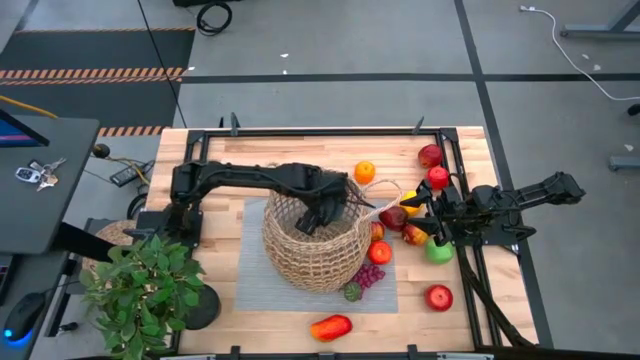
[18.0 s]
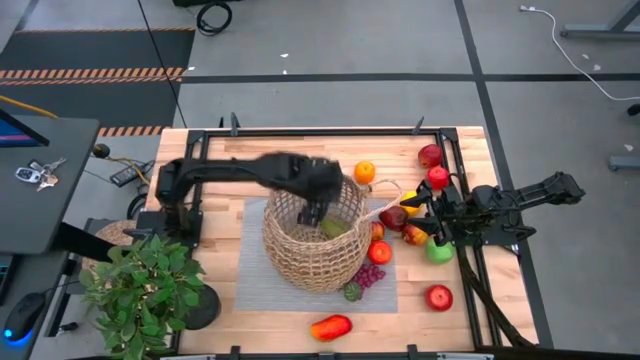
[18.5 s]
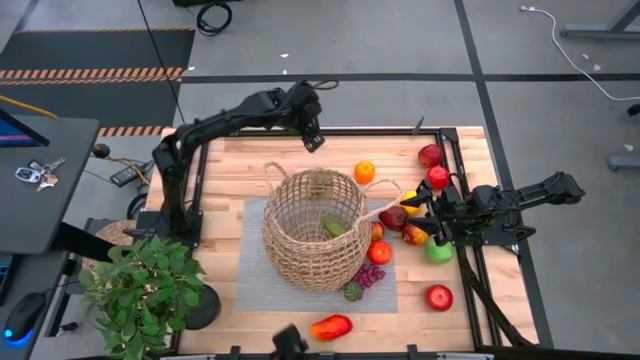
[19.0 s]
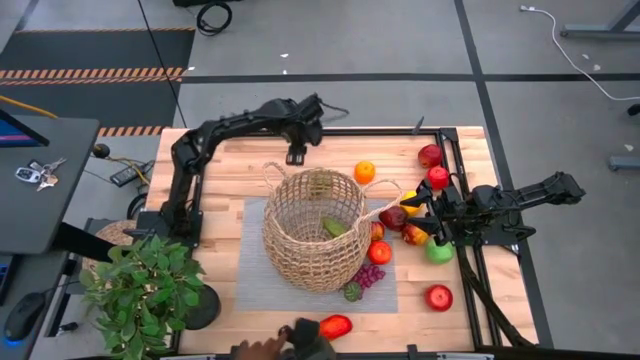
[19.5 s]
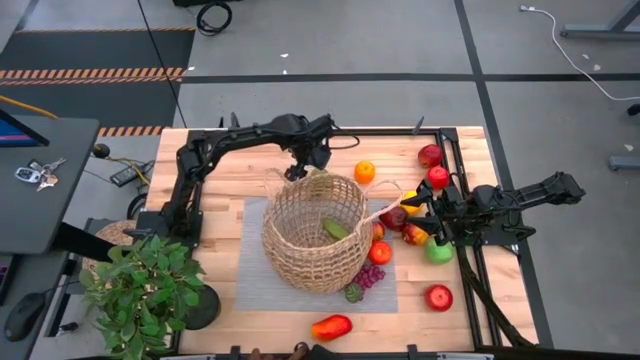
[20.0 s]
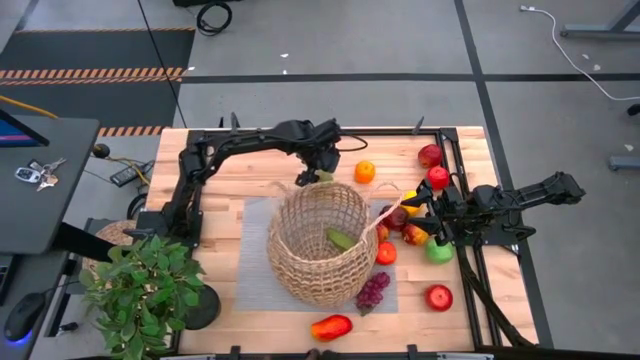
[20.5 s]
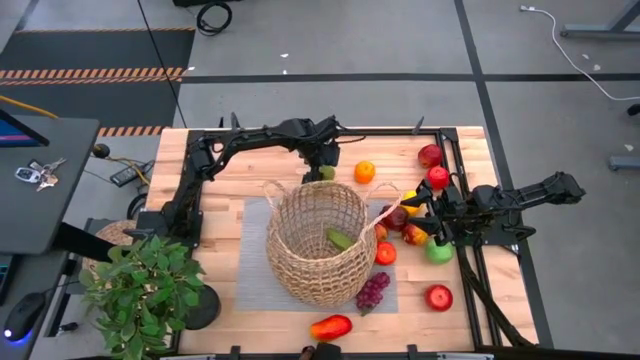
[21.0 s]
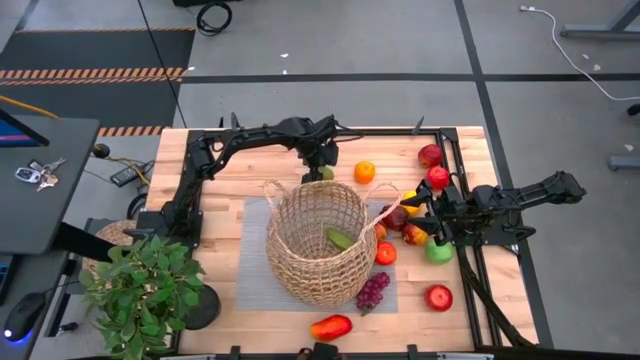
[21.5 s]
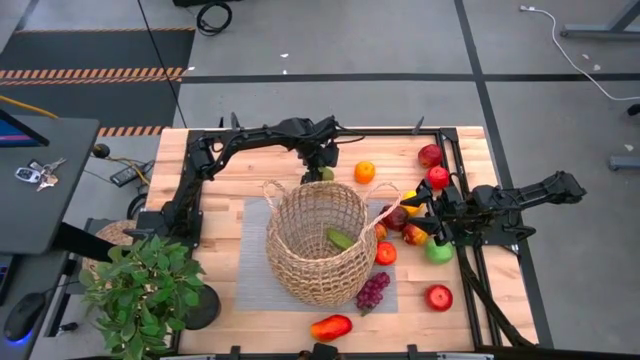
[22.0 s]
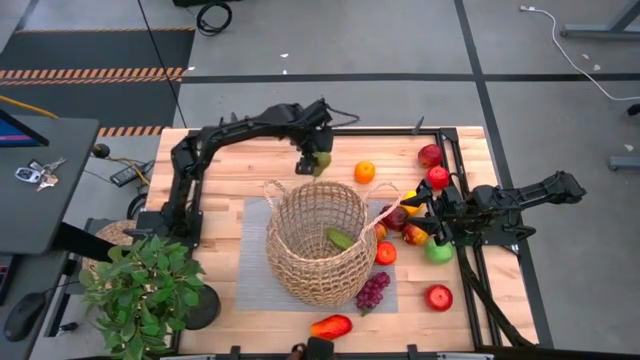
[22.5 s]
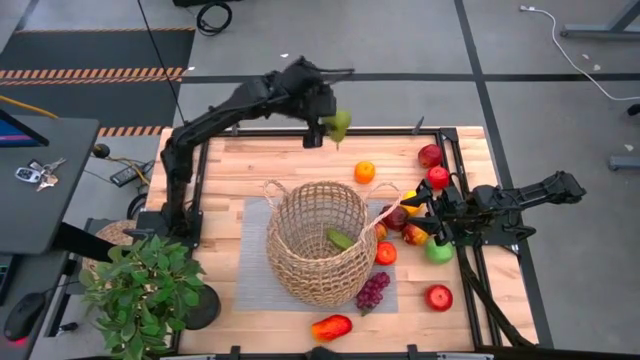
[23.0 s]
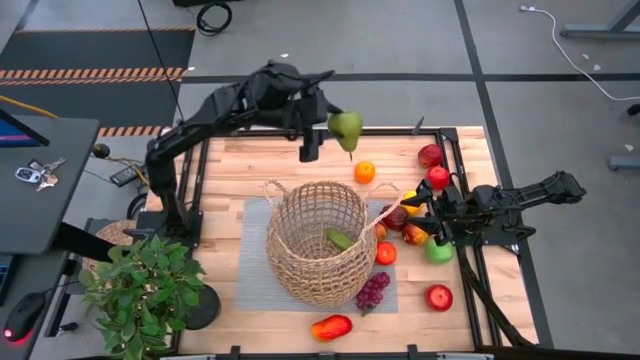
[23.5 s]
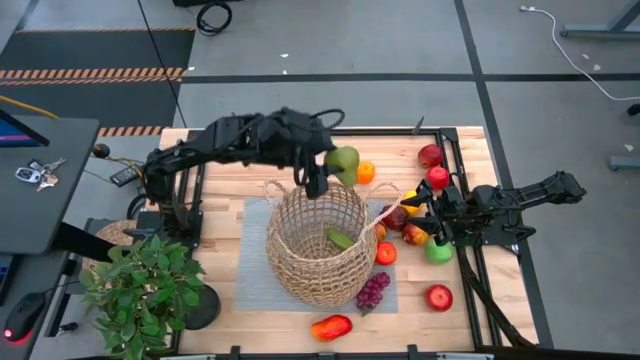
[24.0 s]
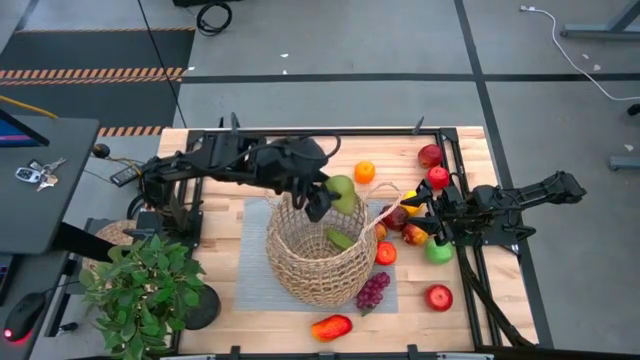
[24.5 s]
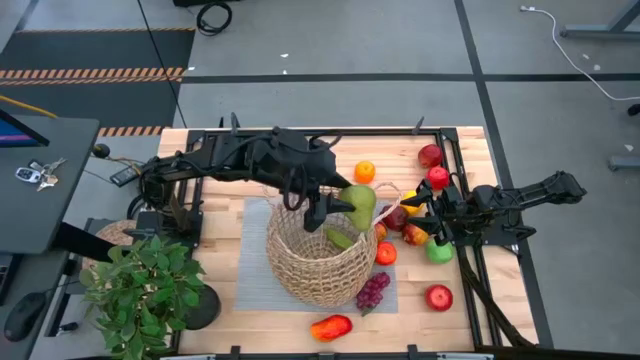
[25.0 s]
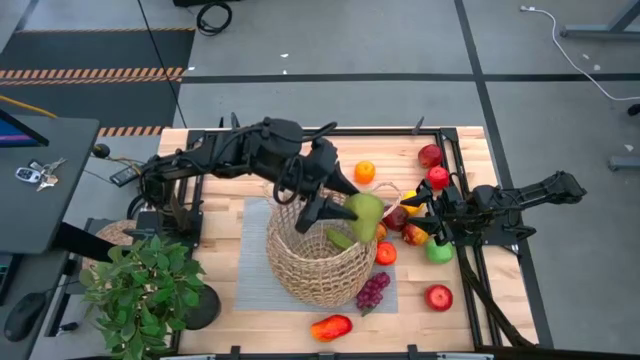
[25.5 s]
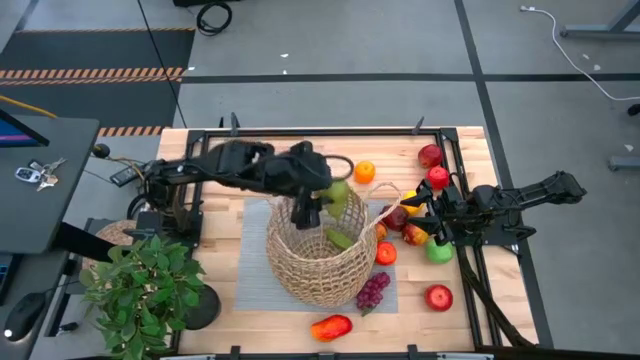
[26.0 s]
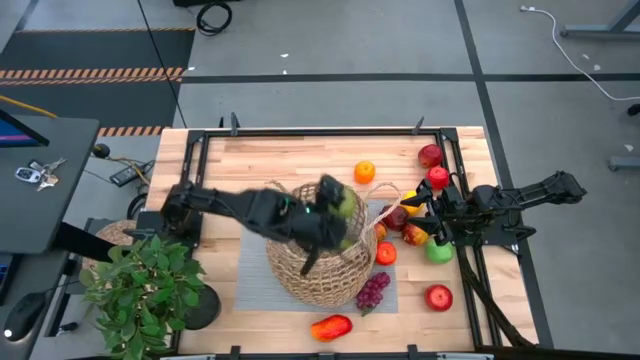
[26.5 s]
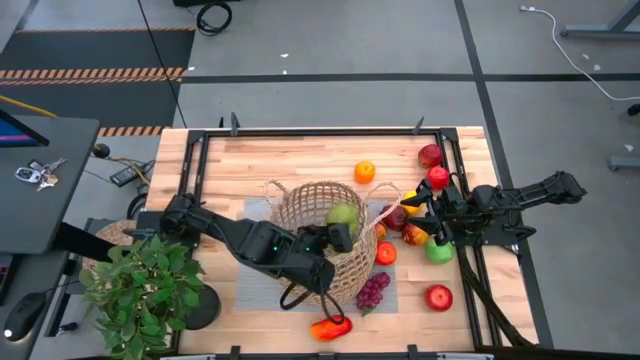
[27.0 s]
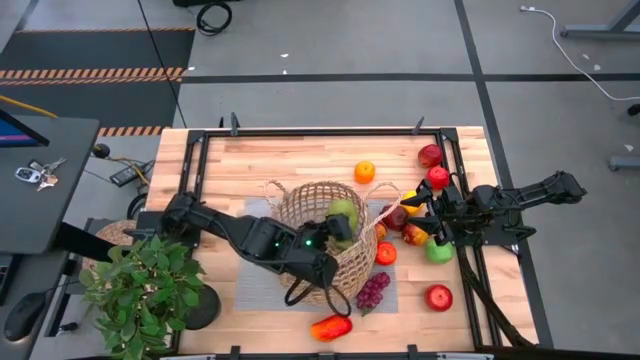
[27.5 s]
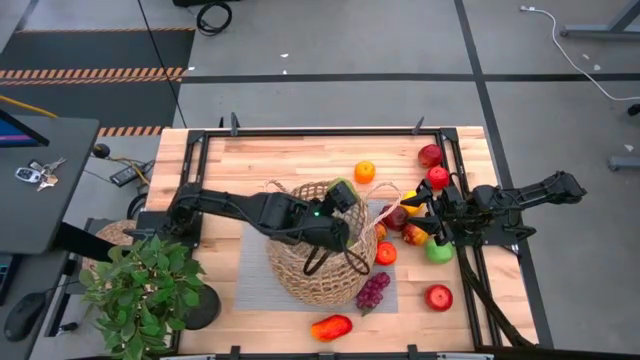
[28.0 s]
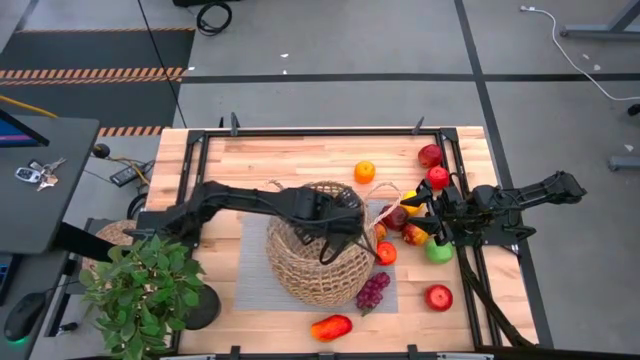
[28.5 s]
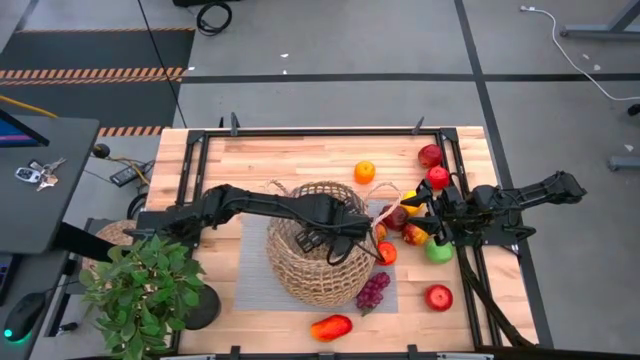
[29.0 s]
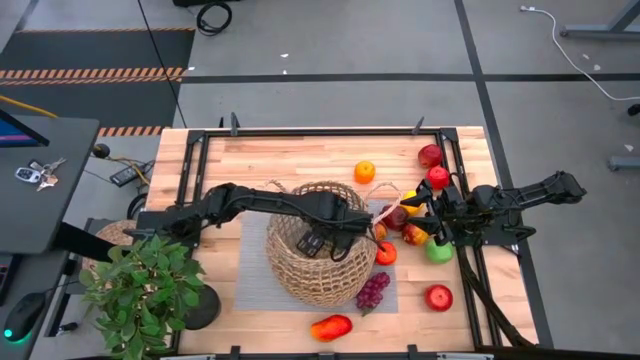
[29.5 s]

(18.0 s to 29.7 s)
Task: Build produce basket
Put the green pear into the brown basket

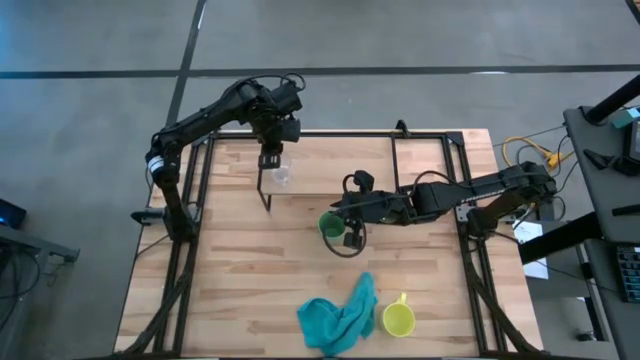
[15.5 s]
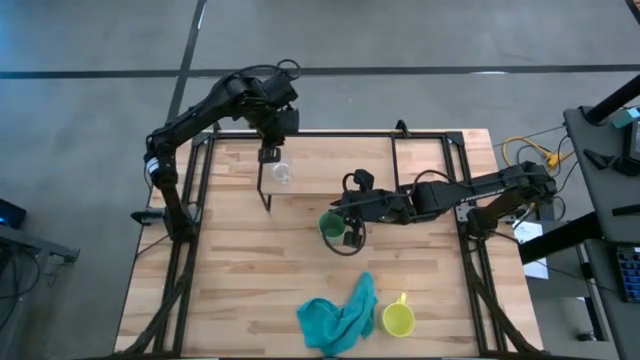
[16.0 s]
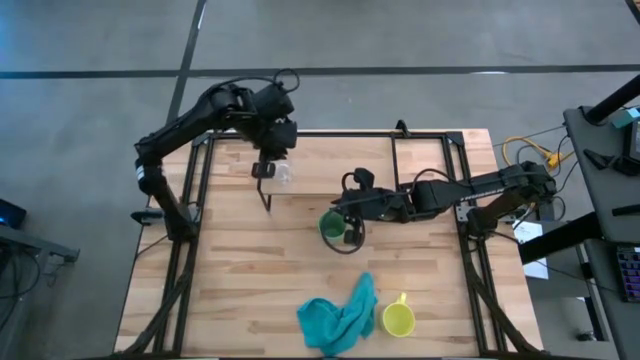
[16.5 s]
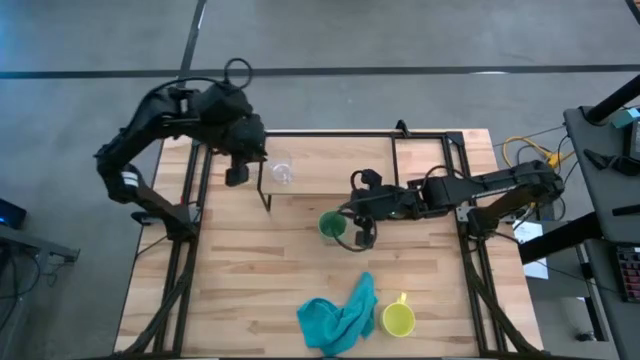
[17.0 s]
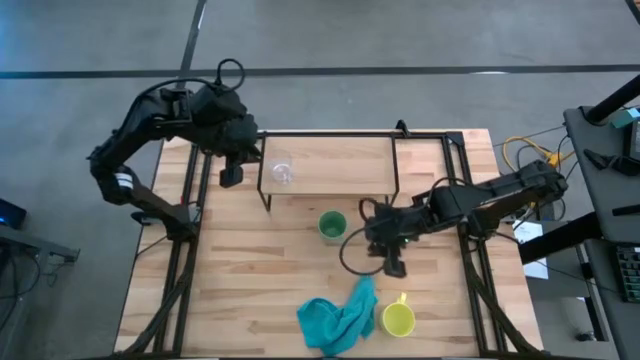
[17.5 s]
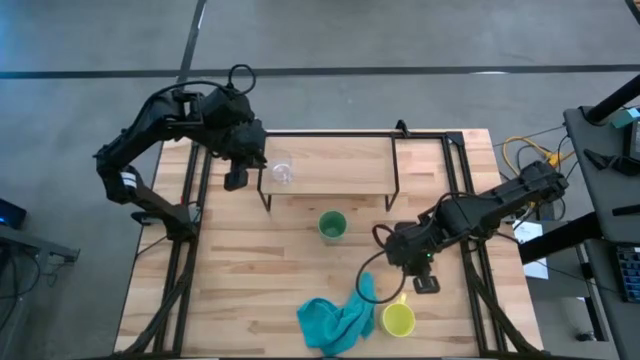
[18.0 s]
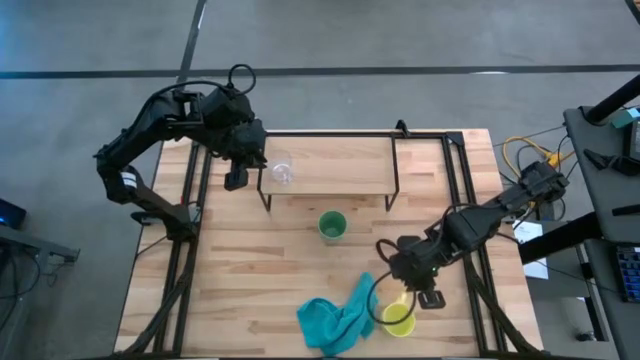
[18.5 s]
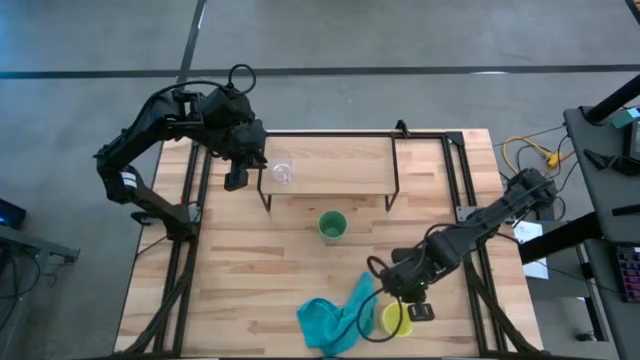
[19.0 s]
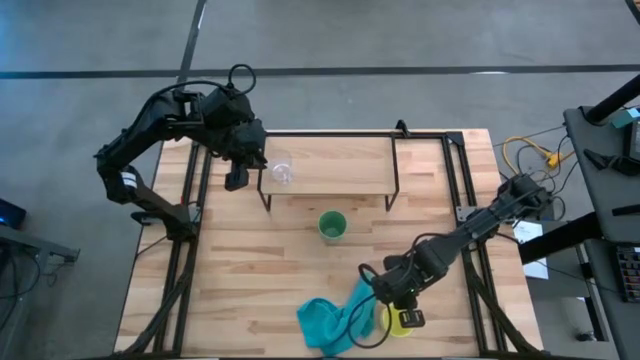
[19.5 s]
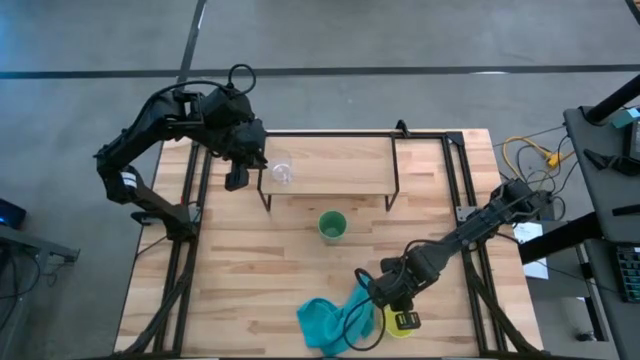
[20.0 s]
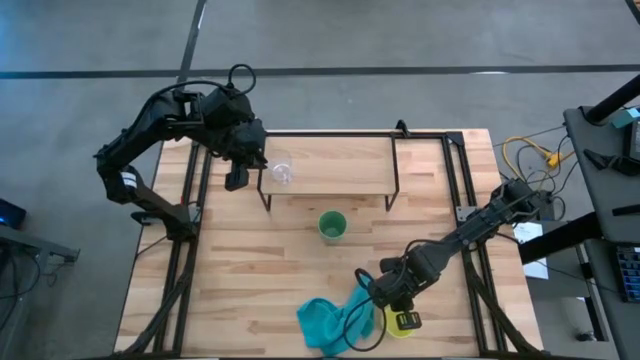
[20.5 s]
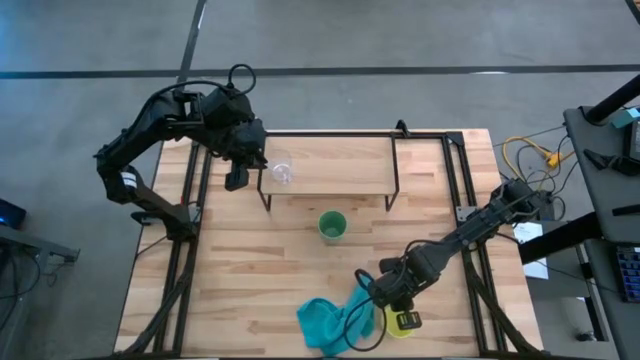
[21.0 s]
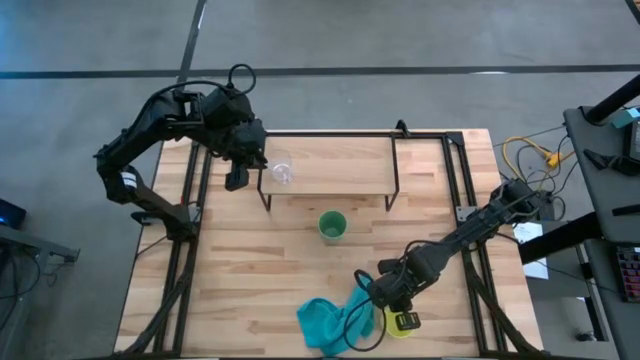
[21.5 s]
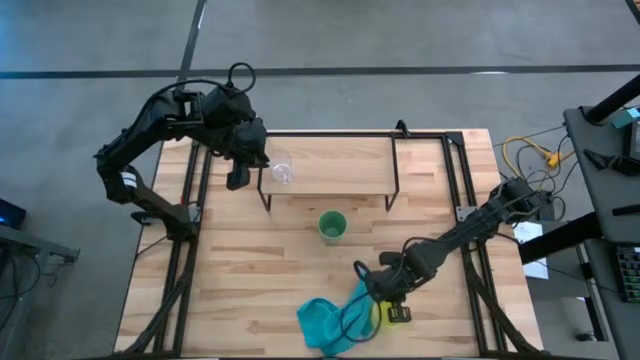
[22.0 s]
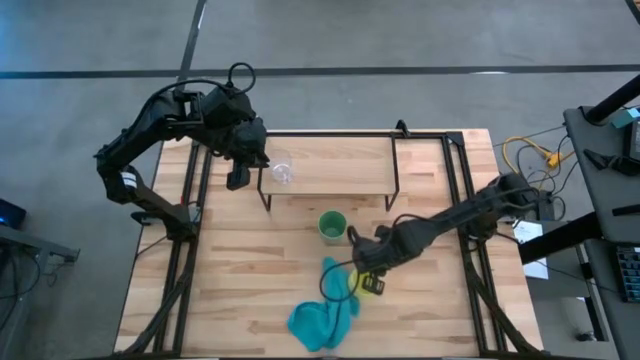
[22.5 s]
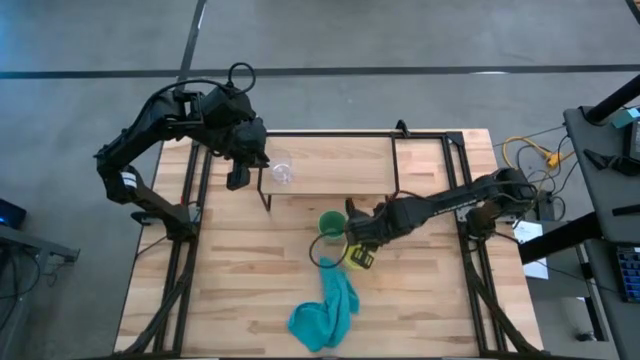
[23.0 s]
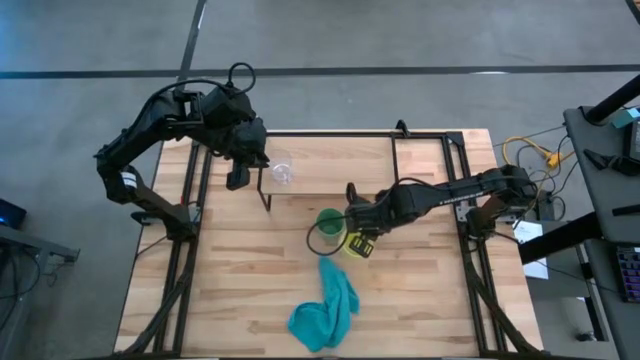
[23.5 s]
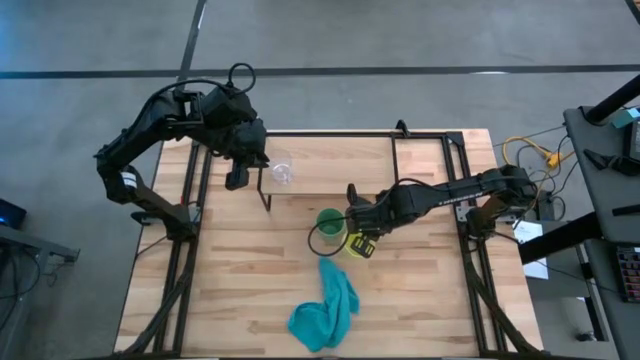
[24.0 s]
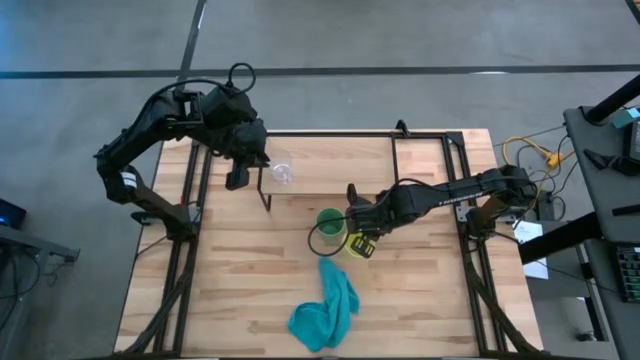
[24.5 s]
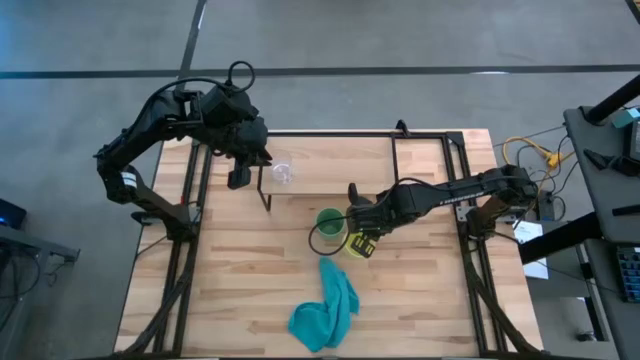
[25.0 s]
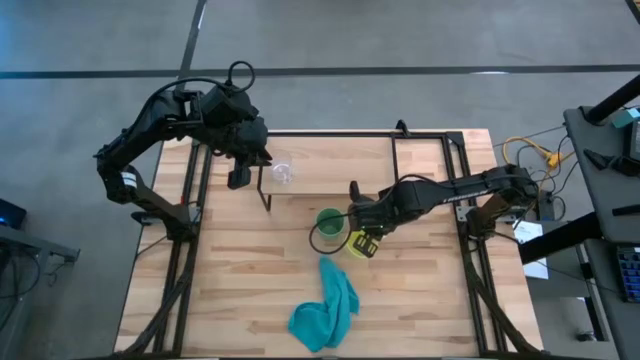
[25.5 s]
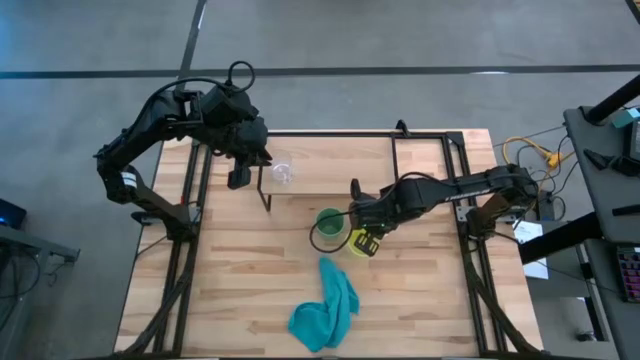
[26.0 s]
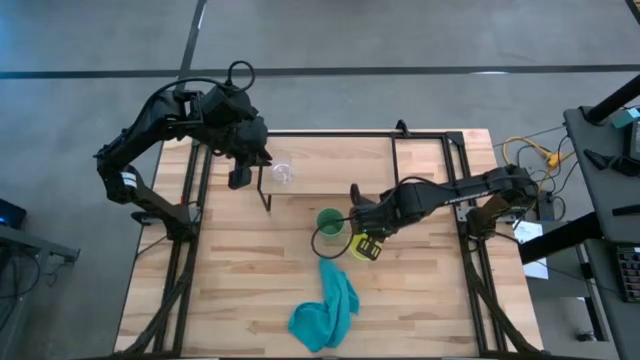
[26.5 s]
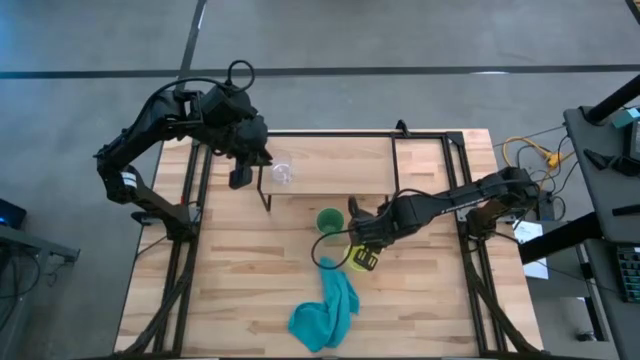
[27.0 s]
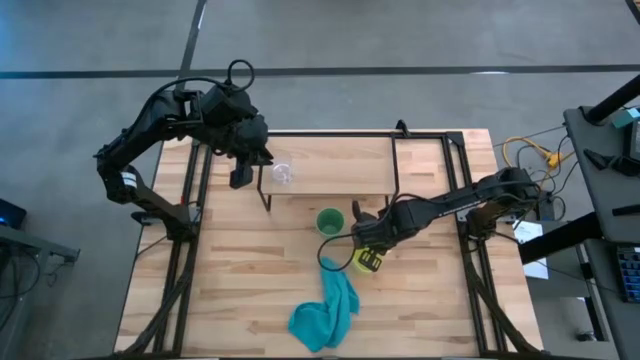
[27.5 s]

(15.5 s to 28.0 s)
Task: Stack small to large cups/mugs on shelf
Put the yellow cup on the shelf
